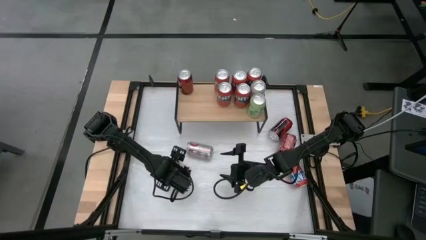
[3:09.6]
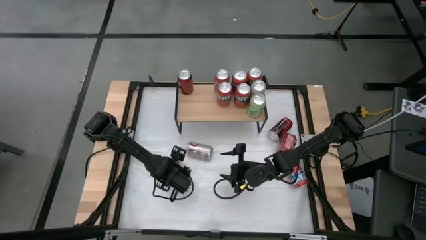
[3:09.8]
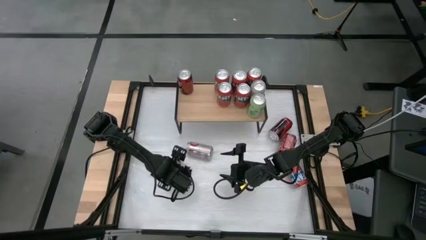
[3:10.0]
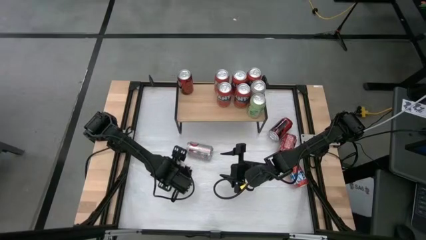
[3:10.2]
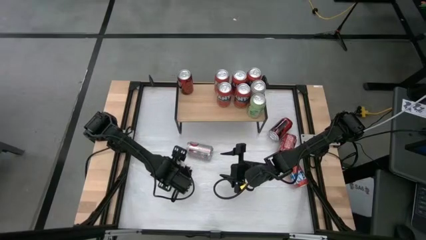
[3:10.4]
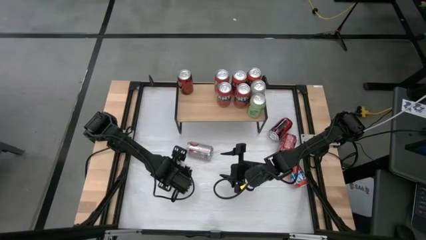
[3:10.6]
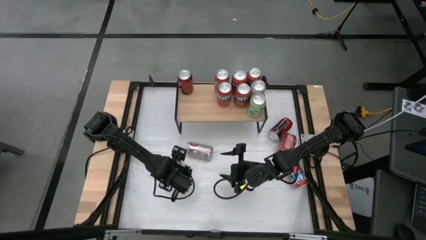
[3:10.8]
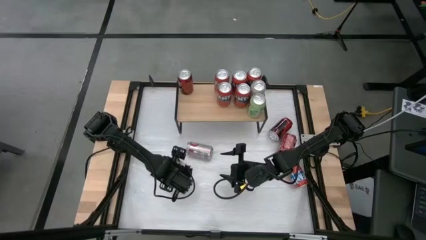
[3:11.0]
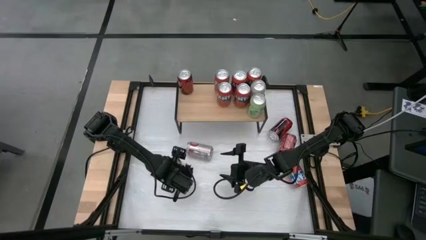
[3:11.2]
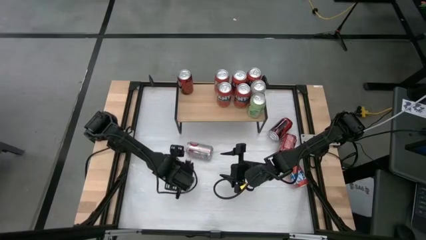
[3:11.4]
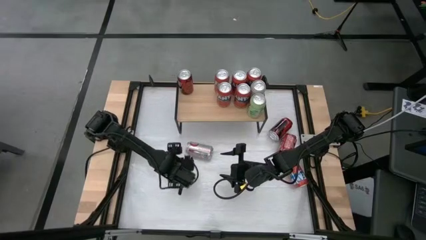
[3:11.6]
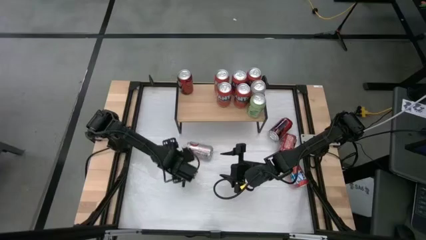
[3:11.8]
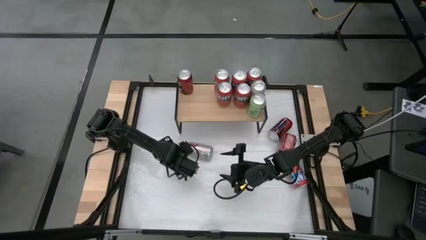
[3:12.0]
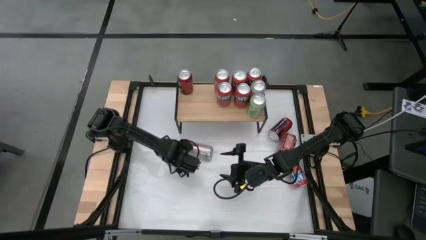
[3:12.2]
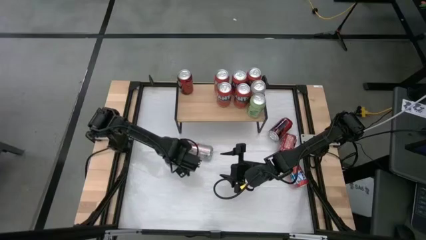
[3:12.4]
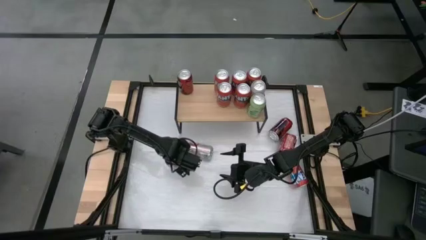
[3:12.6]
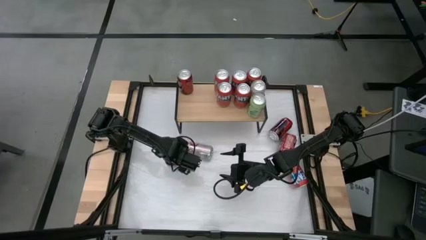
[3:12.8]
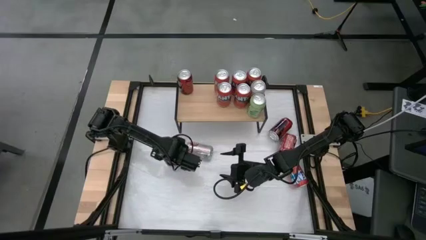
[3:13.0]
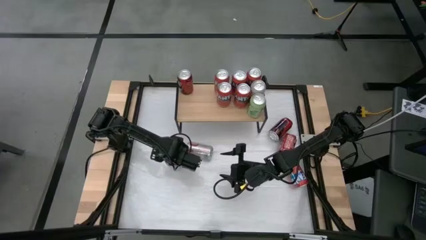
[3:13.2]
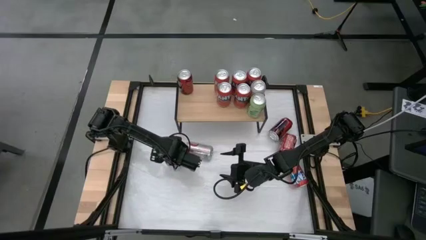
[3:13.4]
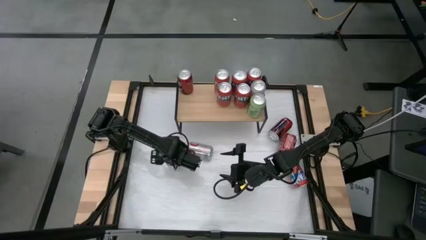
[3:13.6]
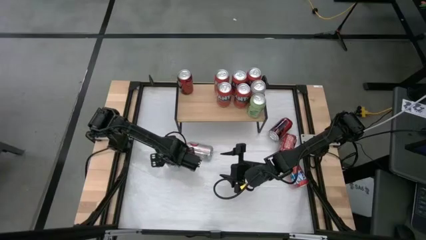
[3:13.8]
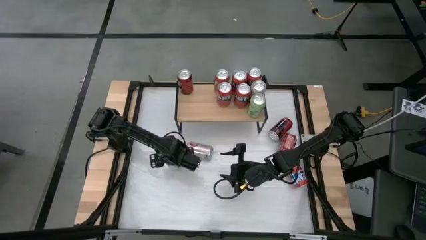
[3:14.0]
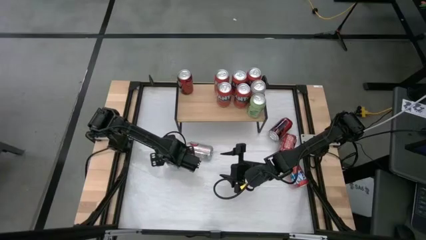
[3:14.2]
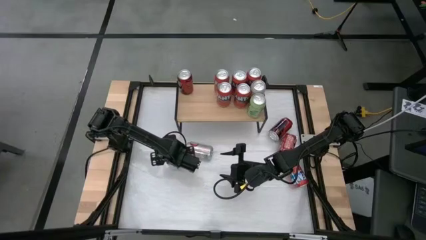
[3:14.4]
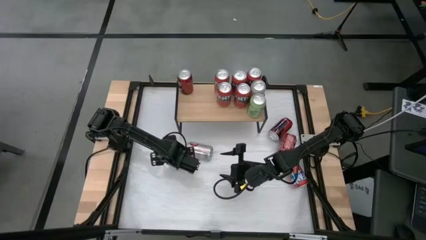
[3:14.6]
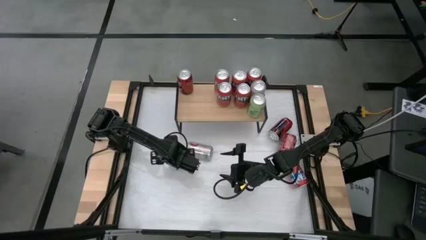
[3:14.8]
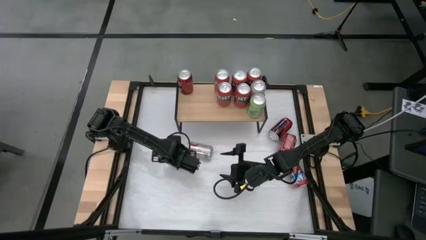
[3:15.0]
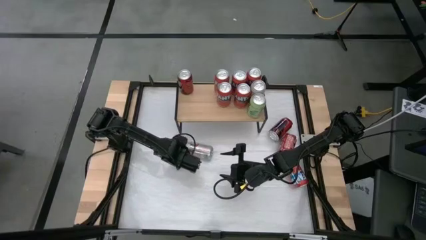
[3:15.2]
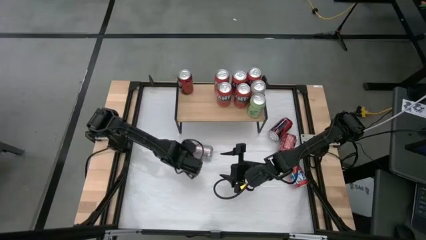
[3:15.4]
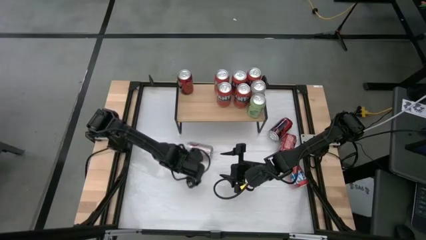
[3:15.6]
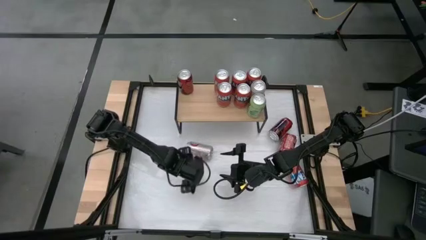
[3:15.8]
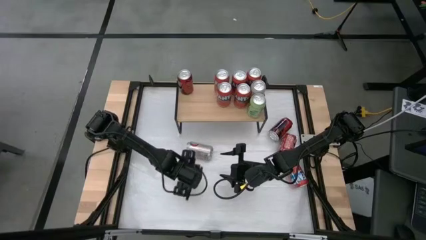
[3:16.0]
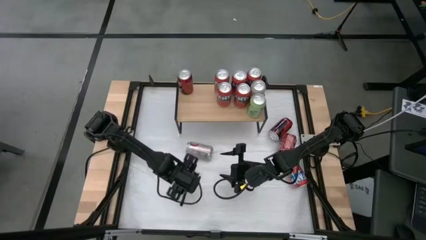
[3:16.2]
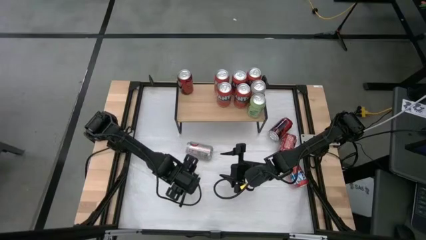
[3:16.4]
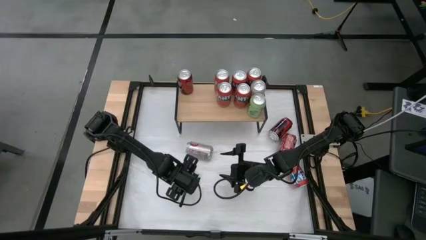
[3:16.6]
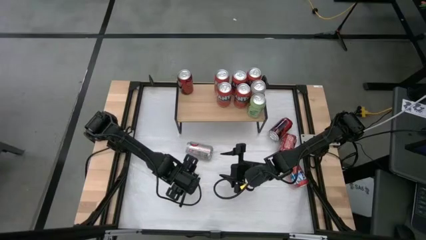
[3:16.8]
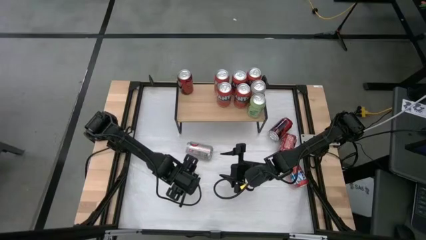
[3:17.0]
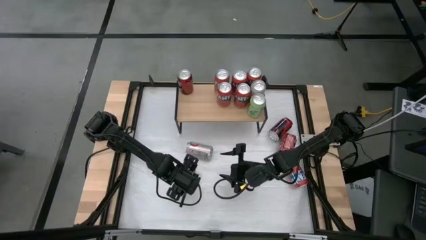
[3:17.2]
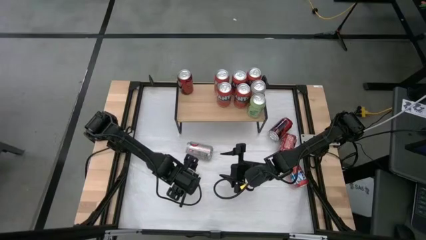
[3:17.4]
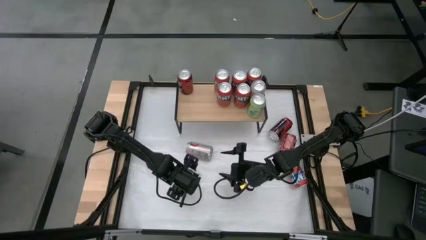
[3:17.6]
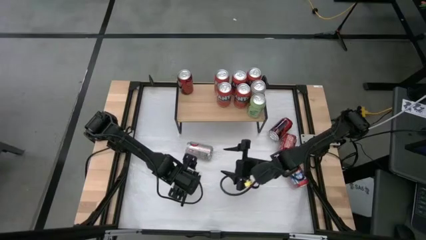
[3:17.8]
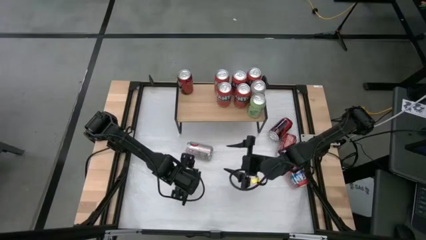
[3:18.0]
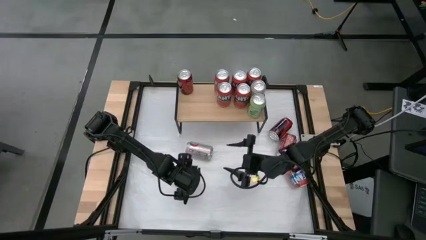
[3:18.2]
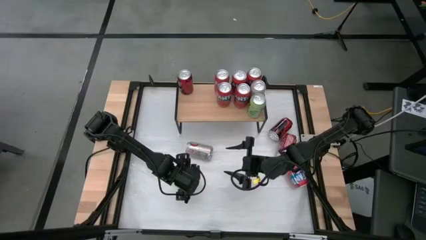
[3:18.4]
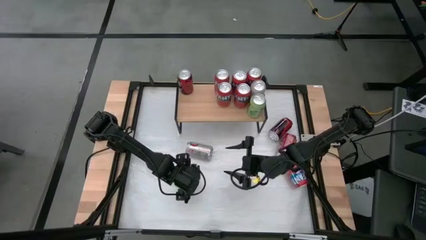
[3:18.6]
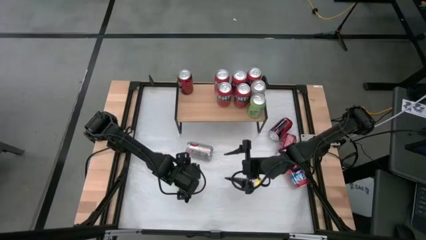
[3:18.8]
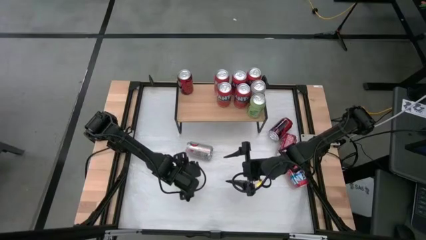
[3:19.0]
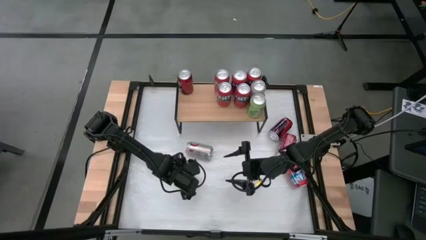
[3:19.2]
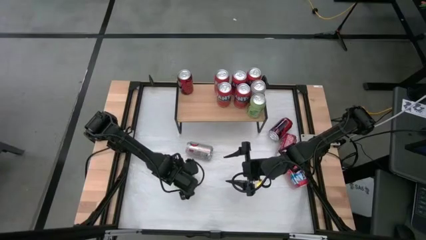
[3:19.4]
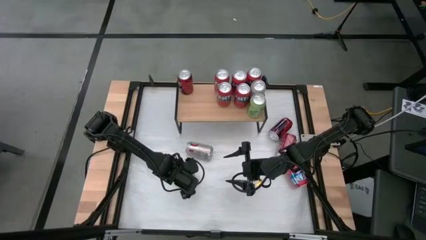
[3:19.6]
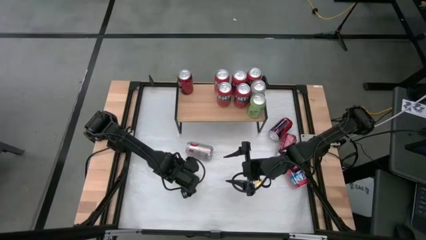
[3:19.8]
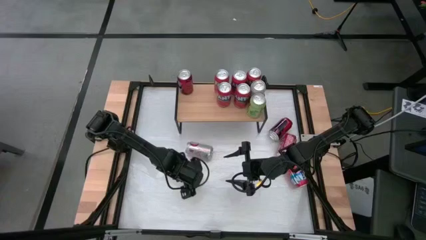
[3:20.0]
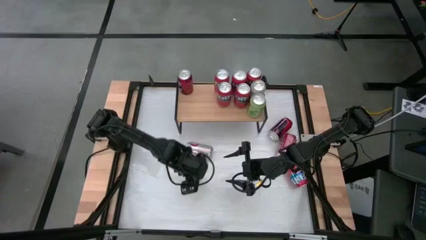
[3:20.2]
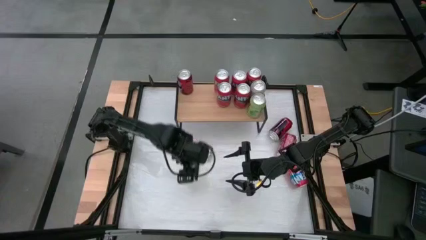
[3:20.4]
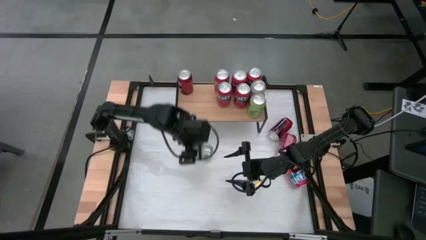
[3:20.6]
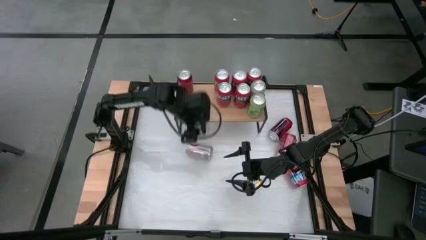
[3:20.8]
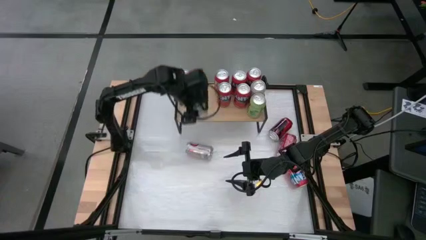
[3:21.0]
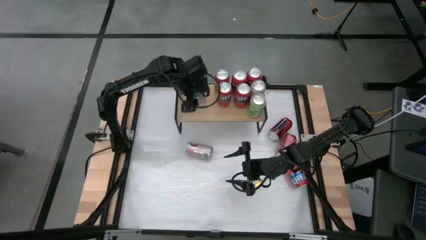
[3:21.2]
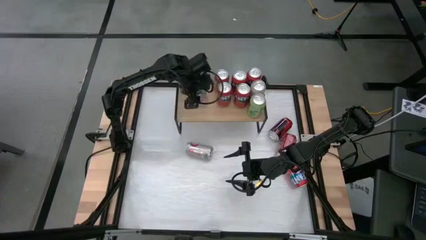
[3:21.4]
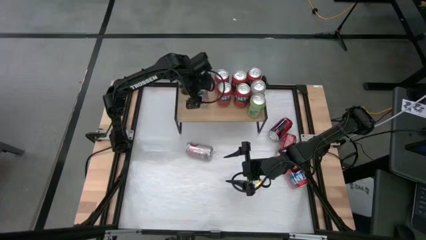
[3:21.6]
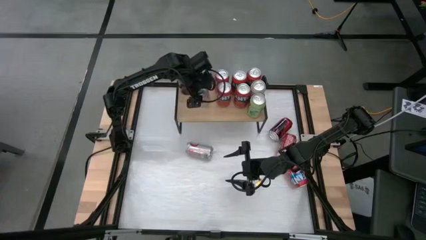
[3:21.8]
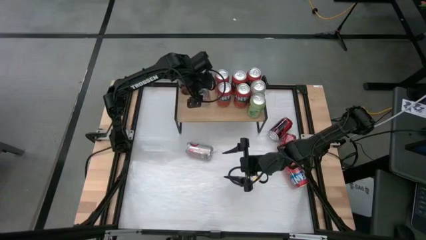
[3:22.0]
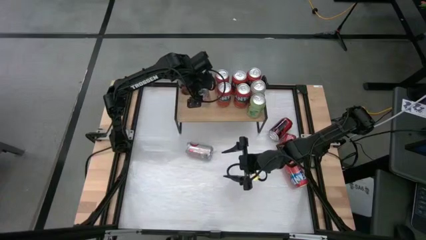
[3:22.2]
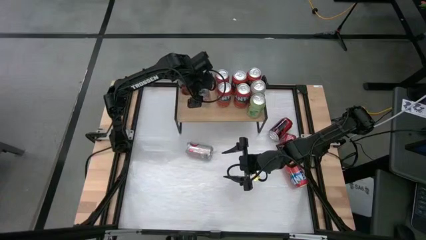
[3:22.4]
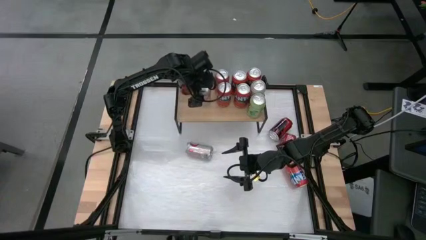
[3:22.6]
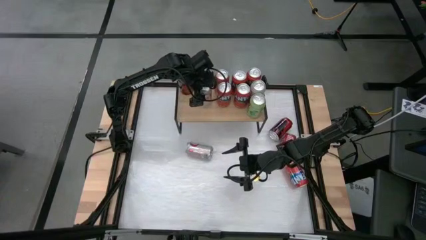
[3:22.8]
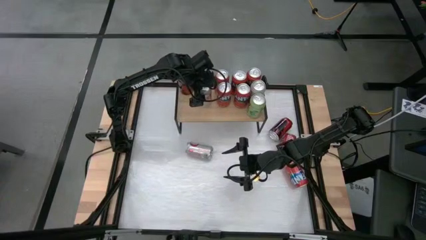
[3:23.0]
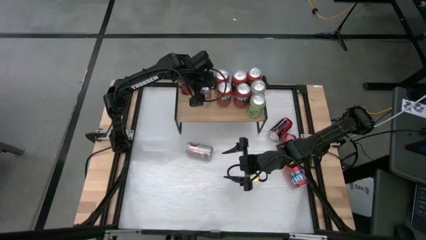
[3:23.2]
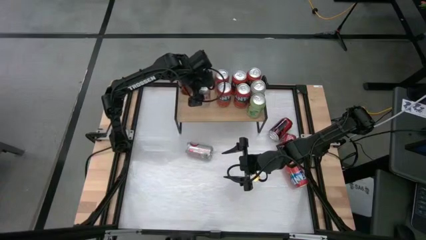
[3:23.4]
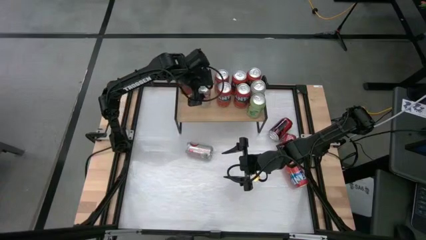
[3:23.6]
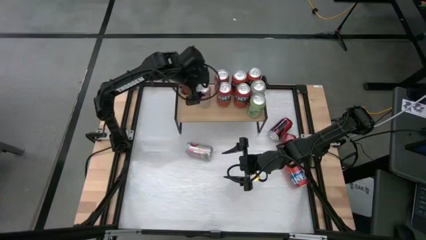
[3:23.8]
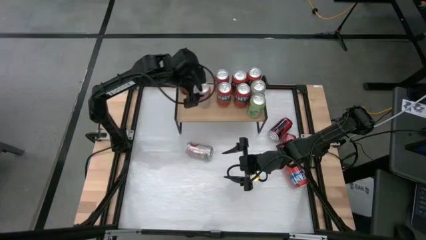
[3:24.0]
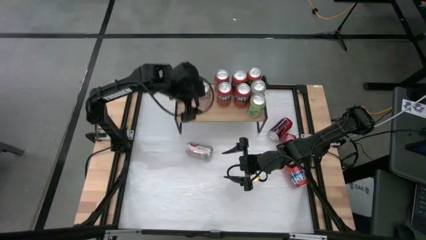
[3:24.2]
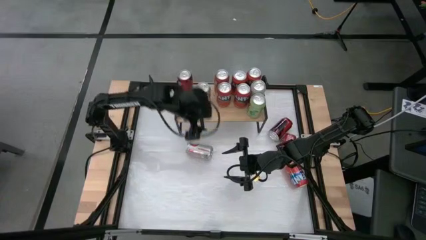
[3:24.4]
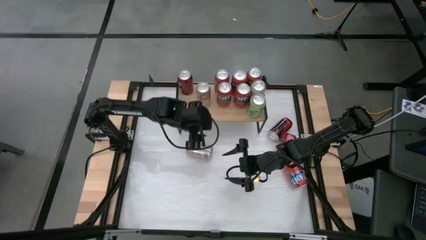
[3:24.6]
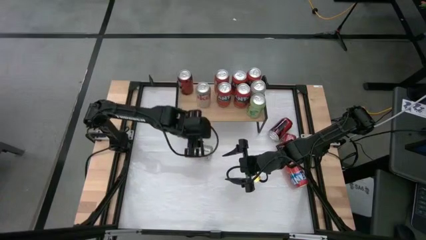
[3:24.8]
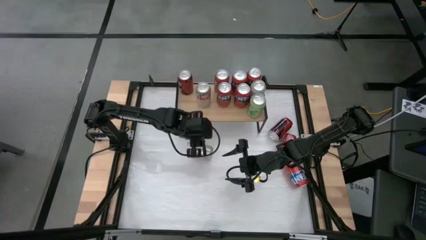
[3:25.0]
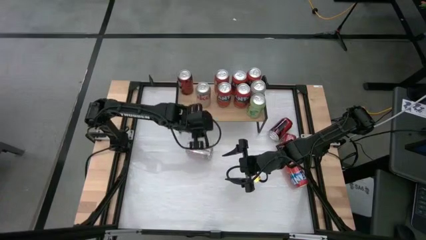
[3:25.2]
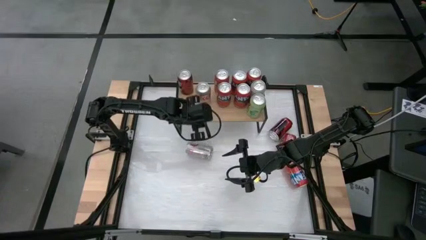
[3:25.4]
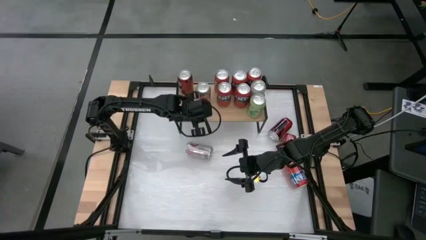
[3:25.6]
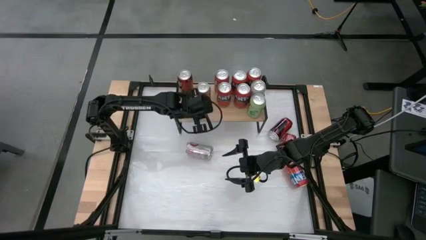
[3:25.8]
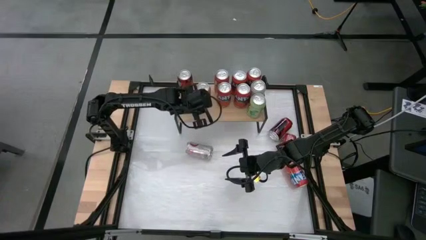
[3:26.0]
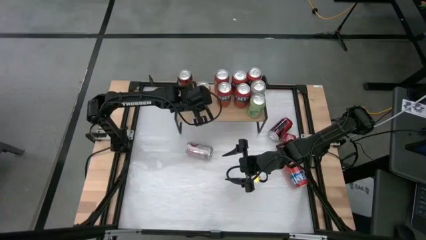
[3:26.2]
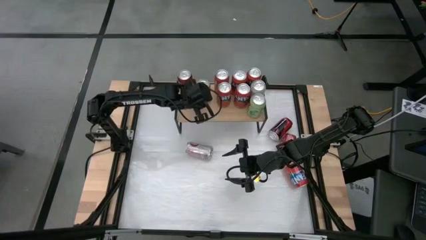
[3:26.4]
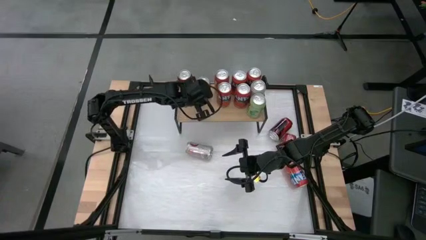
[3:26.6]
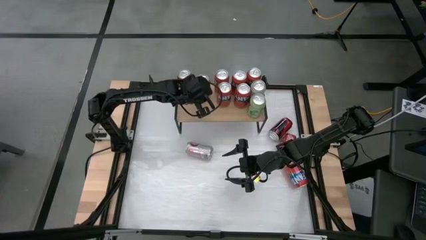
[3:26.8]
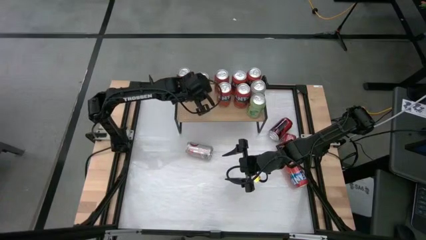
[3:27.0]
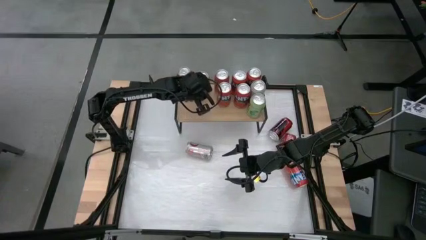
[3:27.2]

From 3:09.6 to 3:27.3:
Task: Place canned beverage on shelf
Put the red white soda can on the shelf
